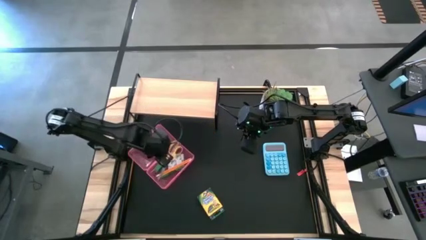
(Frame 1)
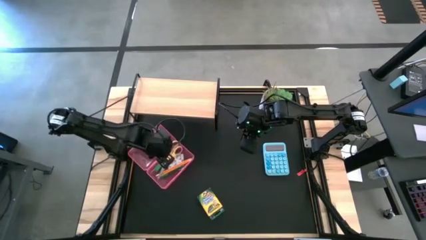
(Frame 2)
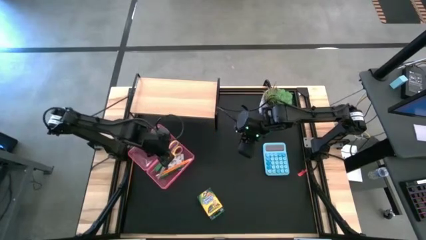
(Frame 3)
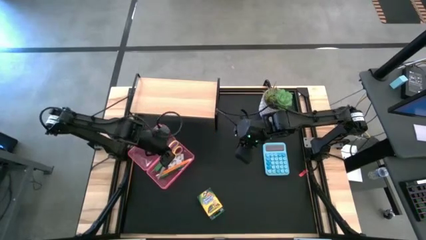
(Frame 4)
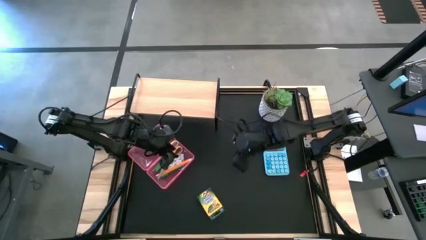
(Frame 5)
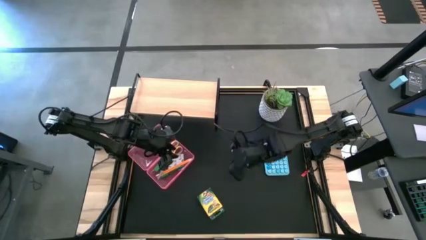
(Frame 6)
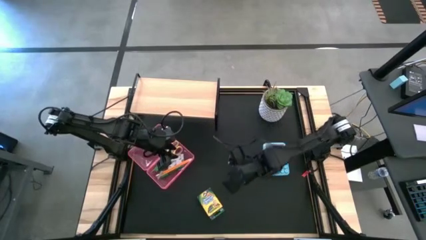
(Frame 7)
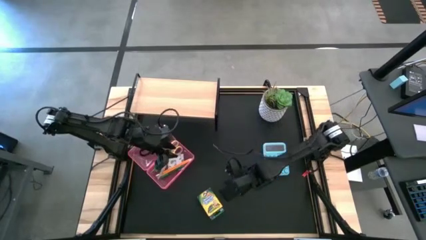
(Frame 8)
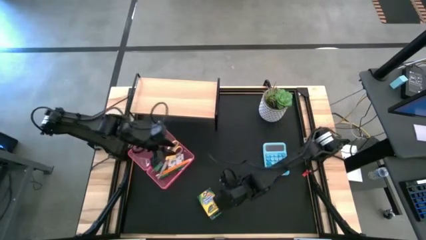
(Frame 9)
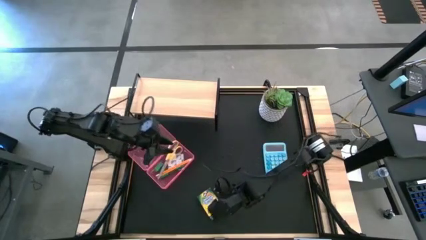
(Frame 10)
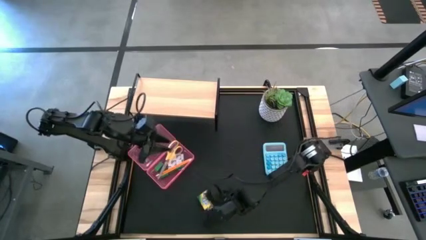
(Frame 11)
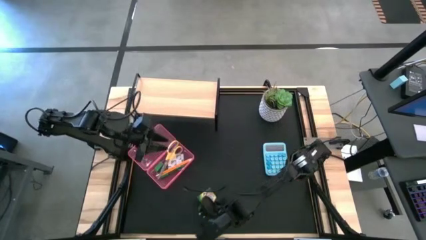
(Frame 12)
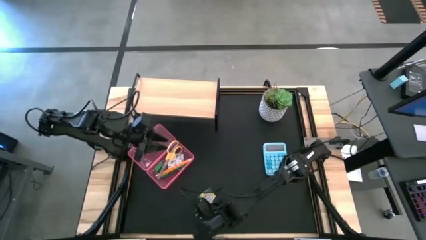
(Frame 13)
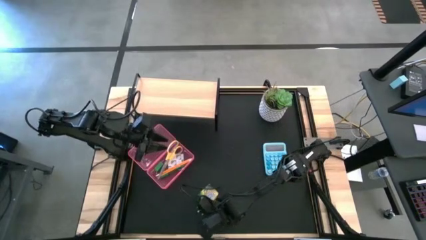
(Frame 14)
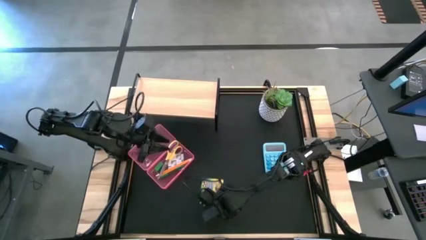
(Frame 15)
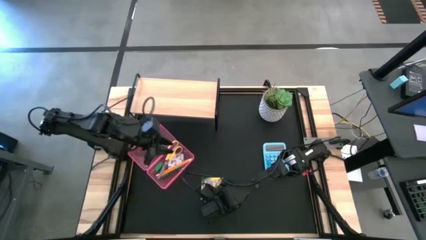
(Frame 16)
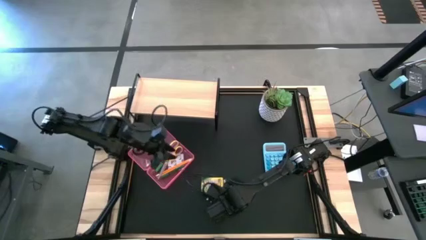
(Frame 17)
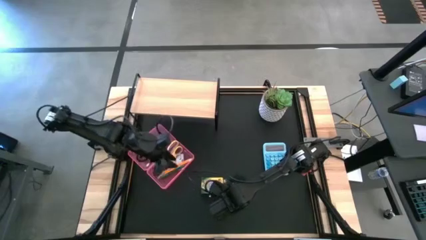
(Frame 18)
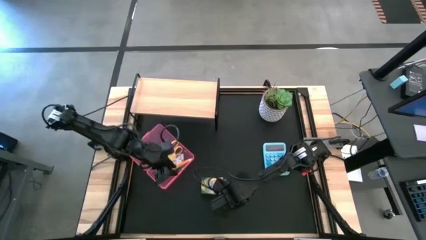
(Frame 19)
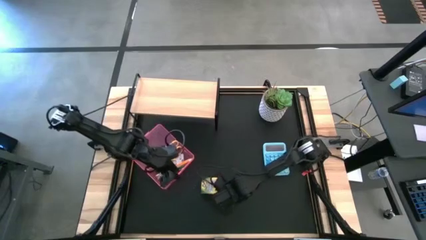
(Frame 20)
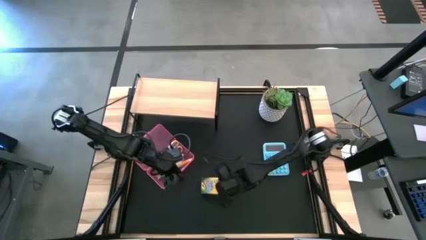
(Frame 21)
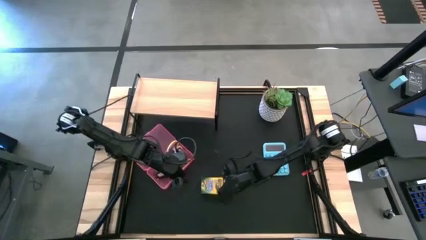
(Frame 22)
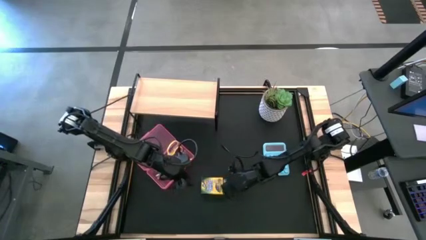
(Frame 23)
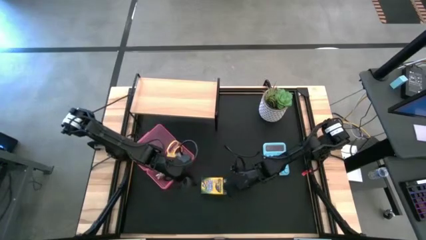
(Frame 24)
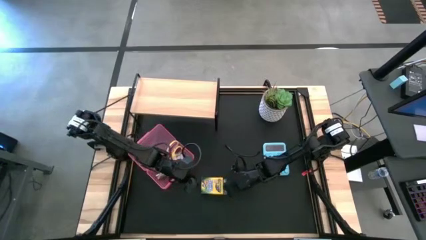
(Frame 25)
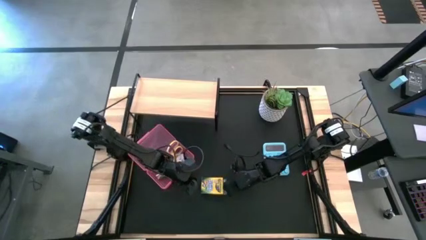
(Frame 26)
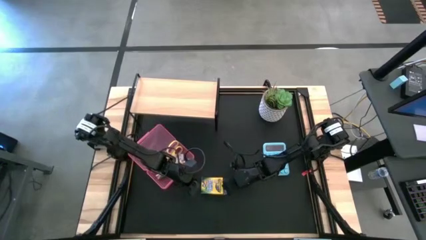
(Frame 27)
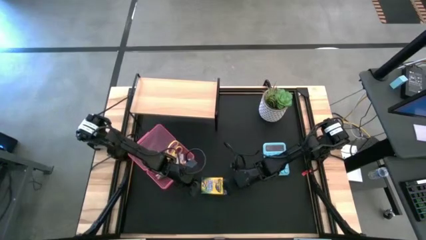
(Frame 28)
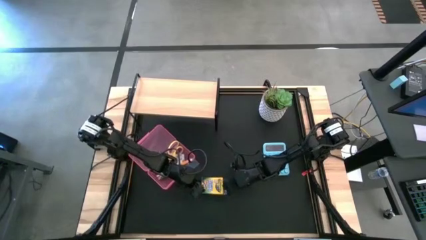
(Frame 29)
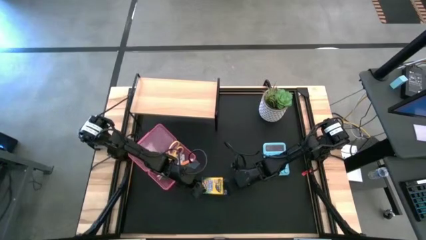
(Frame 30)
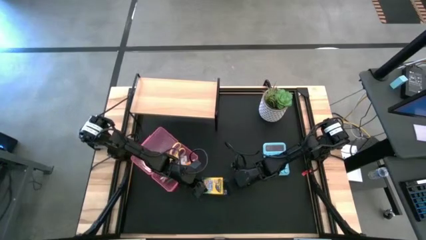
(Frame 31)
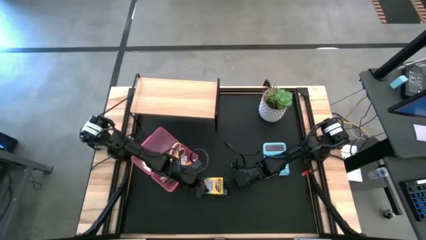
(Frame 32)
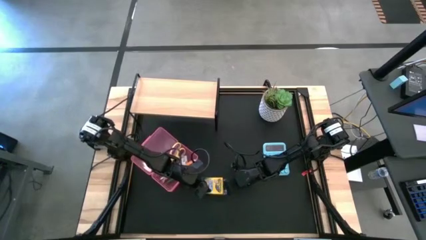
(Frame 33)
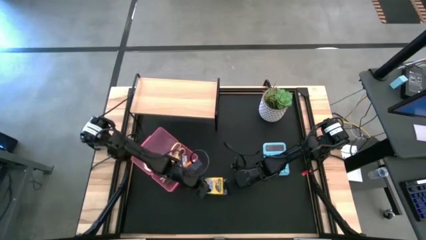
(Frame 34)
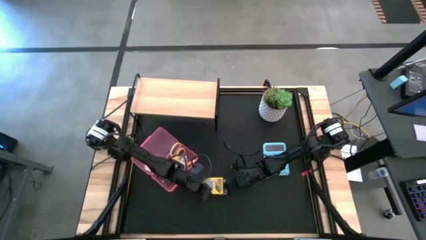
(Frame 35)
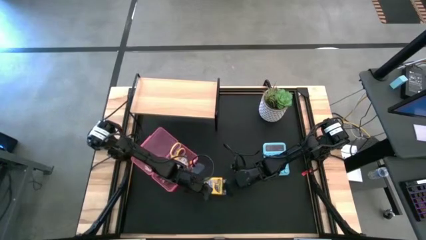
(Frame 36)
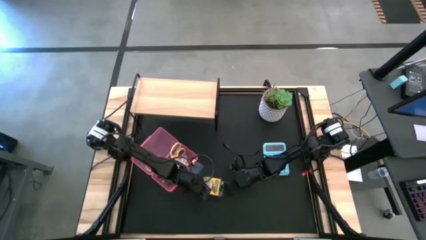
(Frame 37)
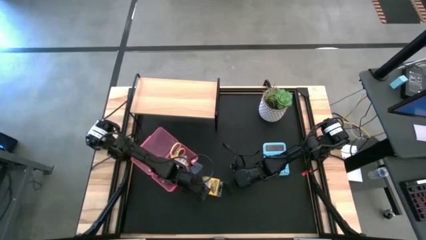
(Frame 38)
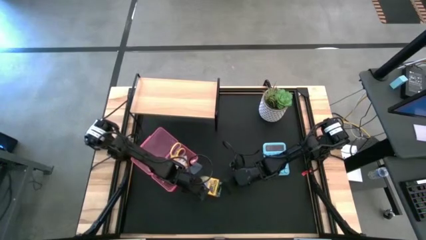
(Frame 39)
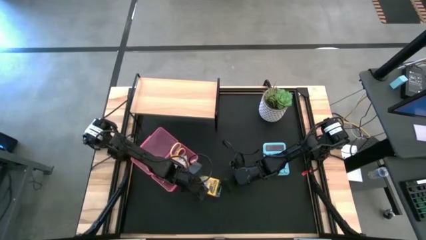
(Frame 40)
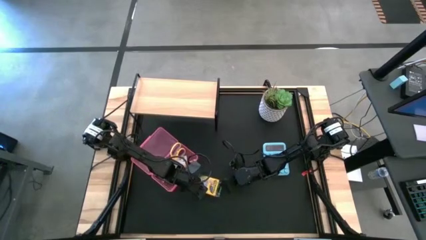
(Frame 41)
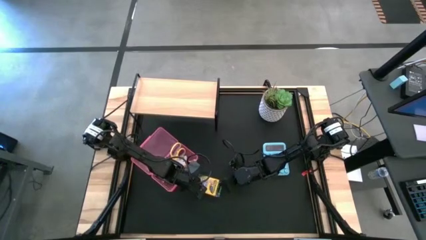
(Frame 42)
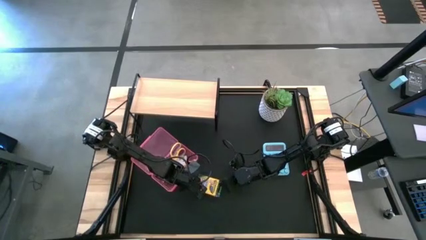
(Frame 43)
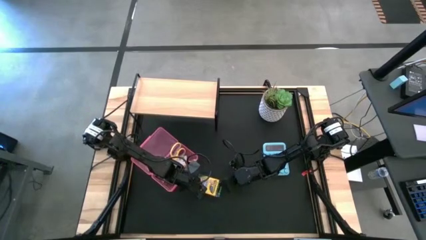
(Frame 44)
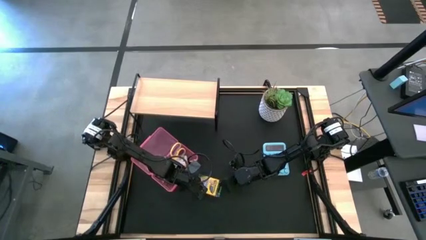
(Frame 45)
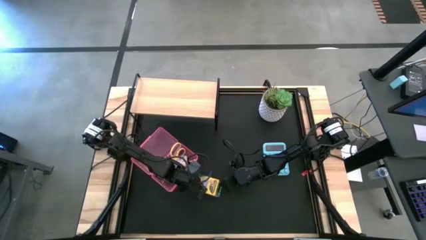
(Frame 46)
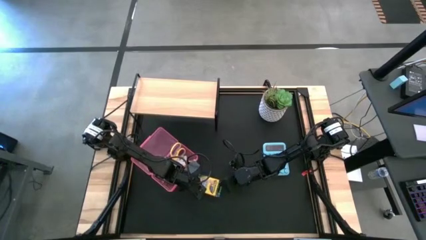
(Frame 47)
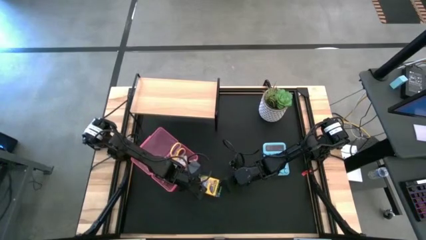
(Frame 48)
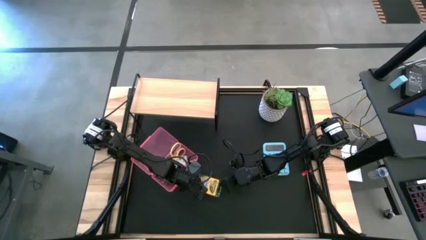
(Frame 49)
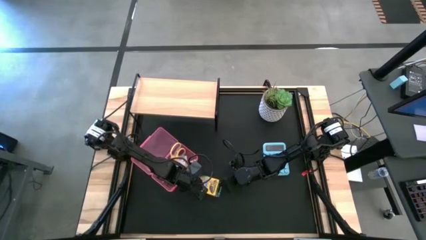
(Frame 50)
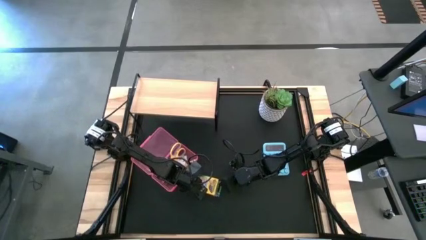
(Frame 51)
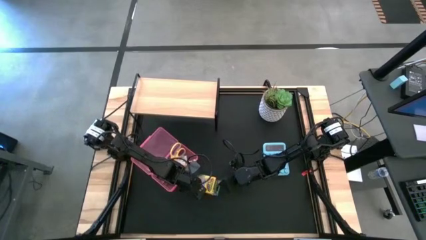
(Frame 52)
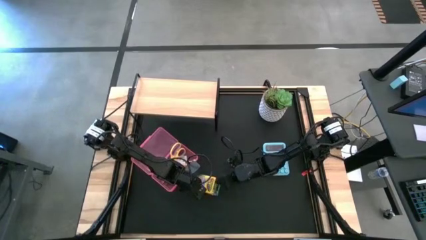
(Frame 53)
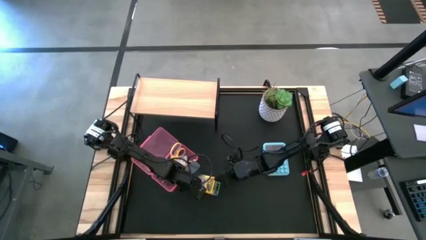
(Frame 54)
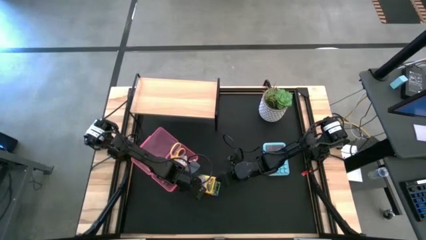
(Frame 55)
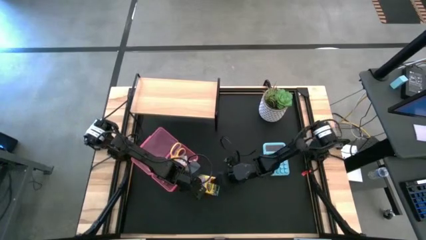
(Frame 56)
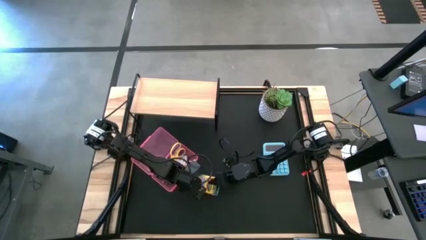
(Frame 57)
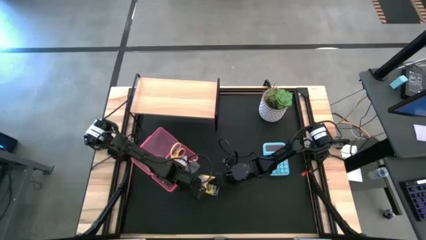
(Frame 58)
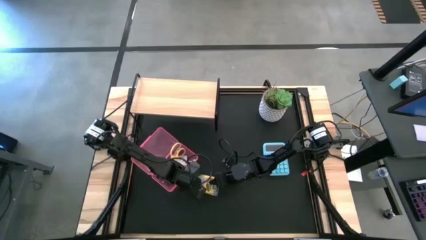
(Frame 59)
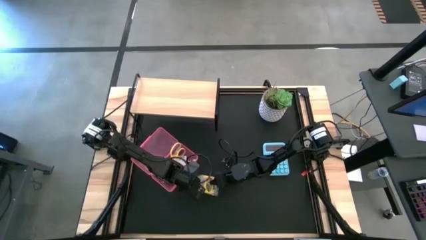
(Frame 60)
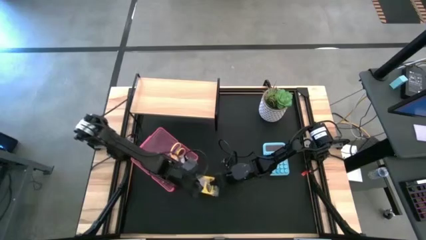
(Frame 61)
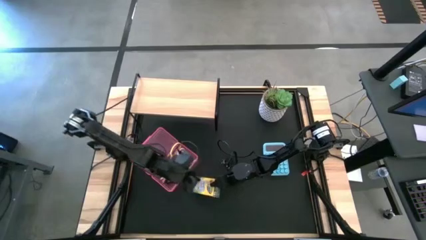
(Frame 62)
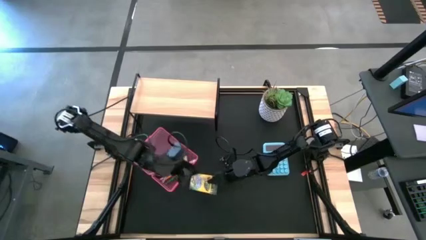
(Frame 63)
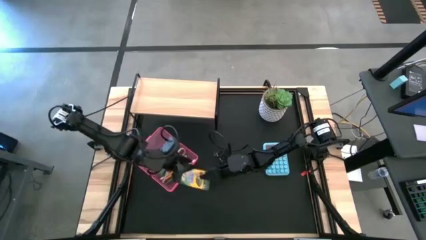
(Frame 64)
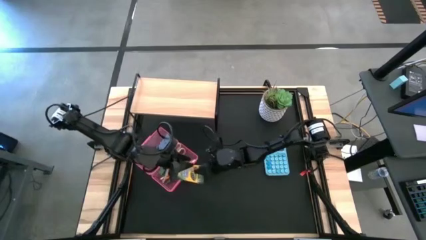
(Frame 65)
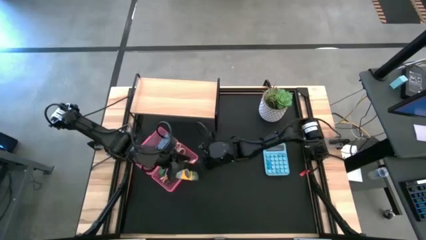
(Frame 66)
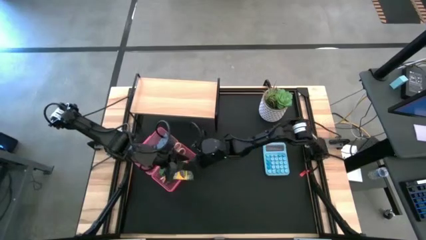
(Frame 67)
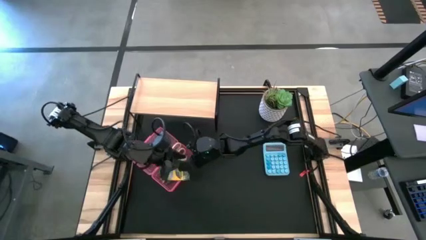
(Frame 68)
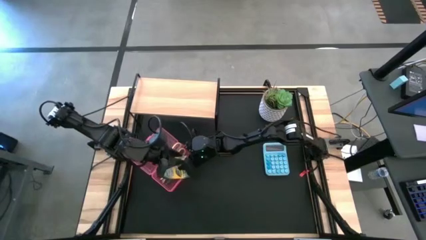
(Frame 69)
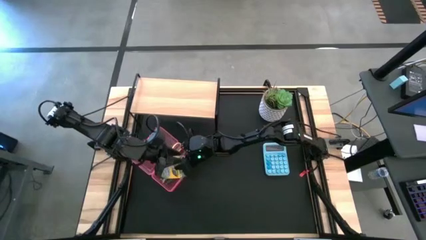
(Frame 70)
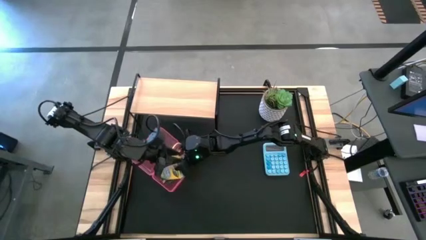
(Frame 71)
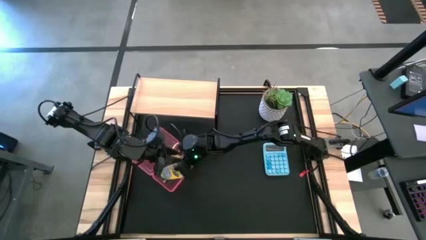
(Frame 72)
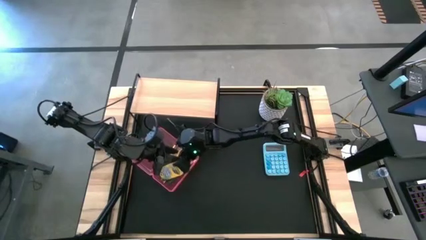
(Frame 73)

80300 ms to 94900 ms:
Task: Pack school essentials
Put the crayons box into the pencil box

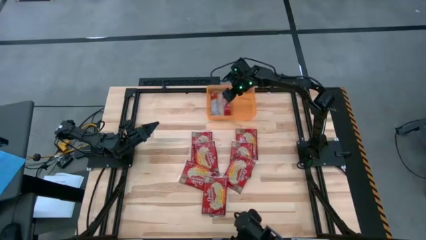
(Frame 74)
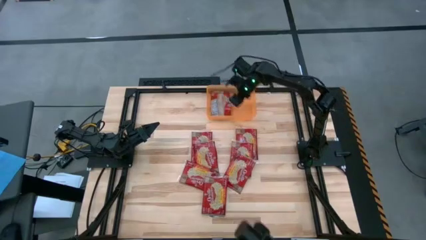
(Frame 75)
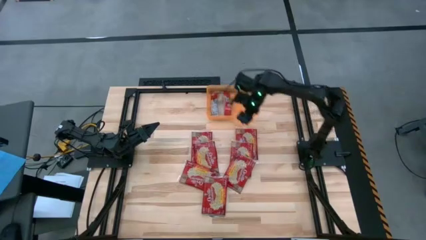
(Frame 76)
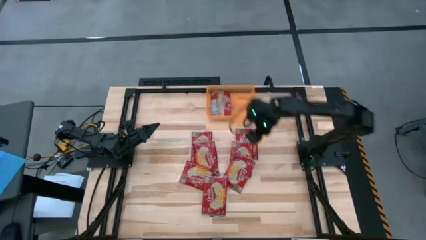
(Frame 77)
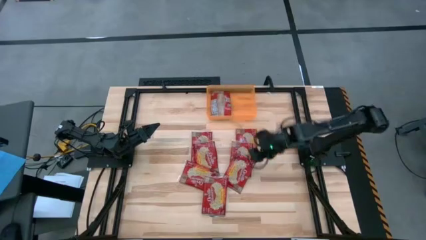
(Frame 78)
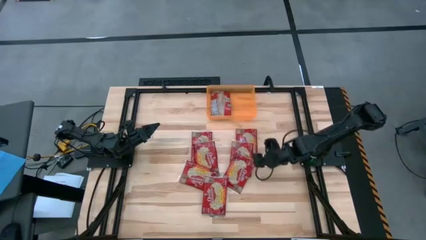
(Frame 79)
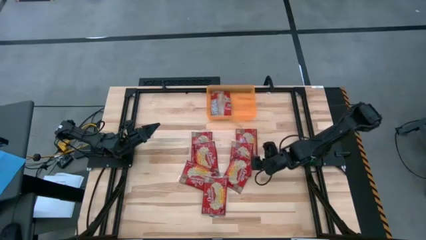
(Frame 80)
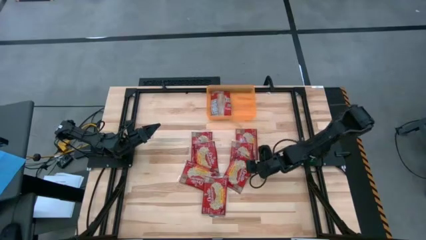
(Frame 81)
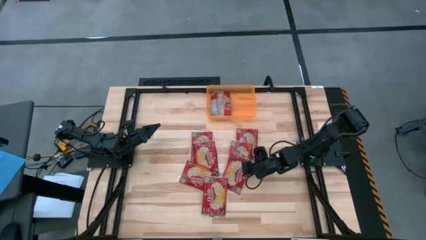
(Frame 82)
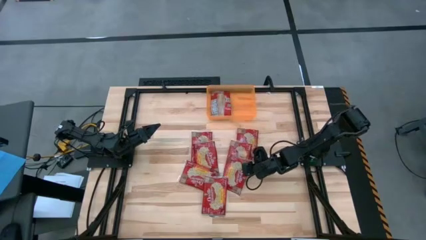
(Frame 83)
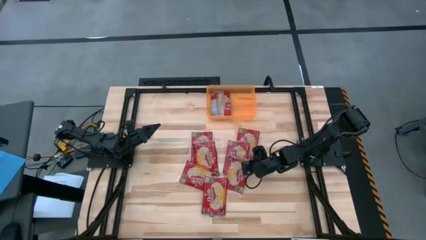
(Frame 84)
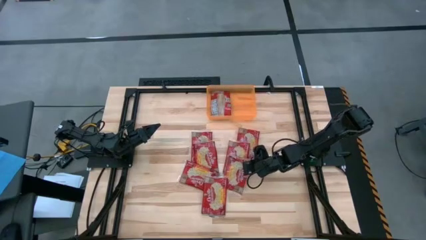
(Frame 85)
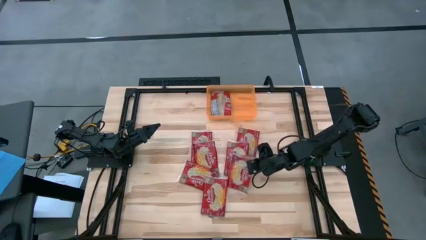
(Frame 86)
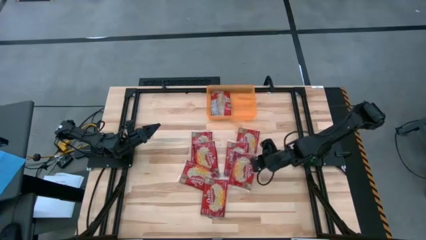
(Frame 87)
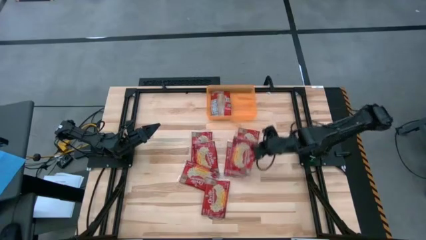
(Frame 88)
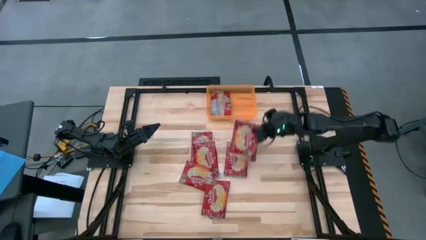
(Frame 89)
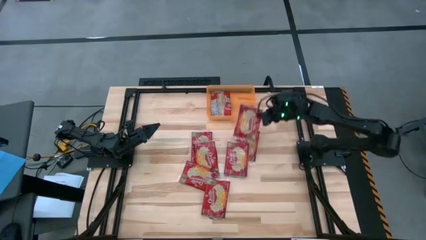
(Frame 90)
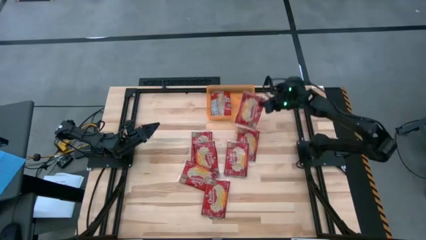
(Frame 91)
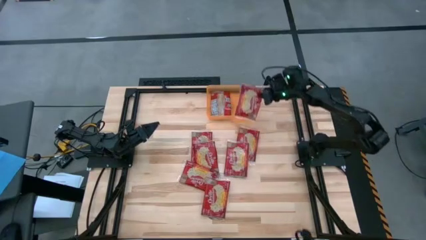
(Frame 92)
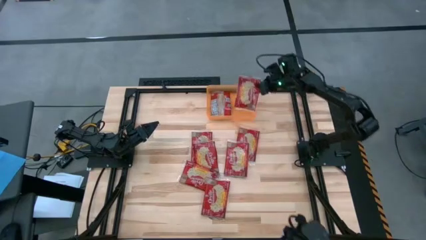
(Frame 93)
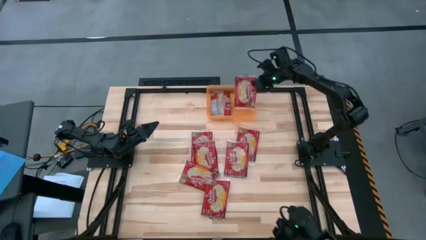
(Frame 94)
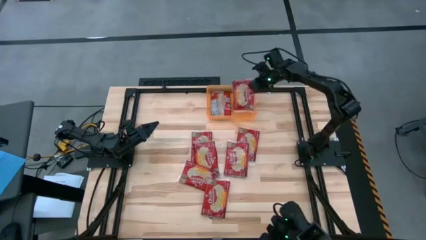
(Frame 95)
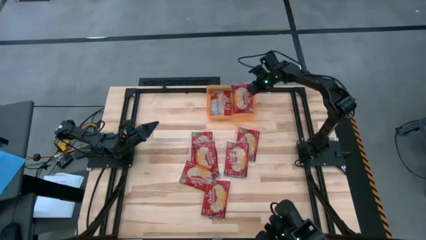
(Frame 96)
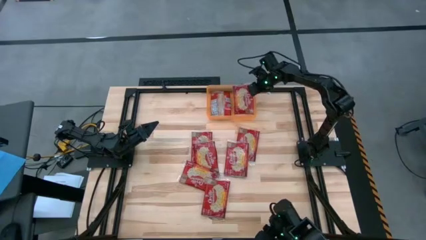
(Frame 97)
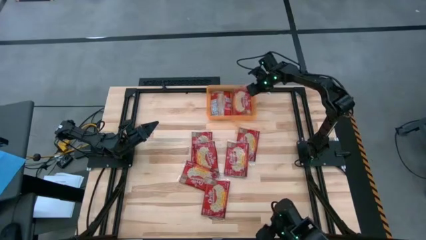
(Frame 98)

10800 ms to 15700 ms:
Task: Sort popcorn bags into baskets
Put the red popcorn bag into the orange bin
